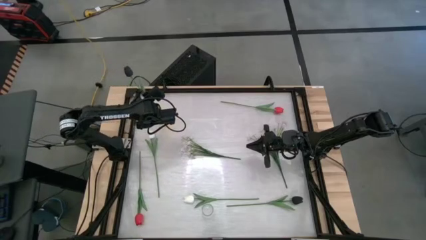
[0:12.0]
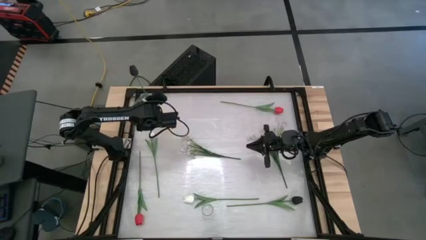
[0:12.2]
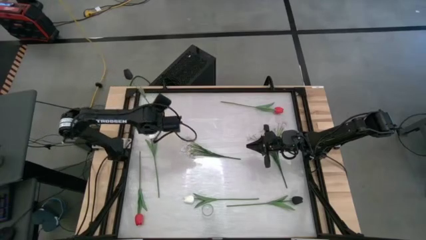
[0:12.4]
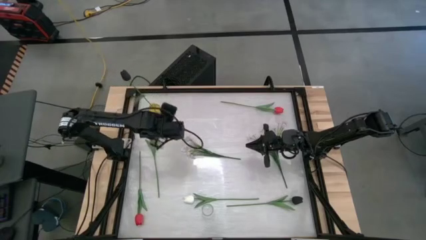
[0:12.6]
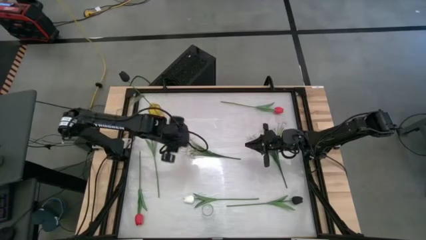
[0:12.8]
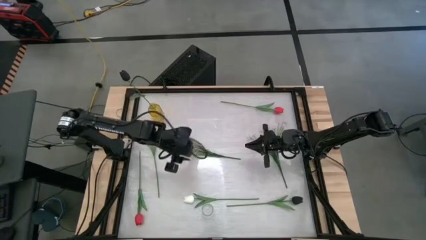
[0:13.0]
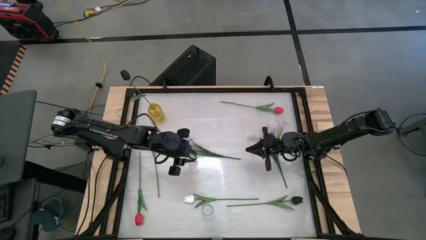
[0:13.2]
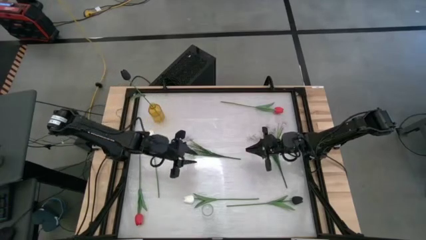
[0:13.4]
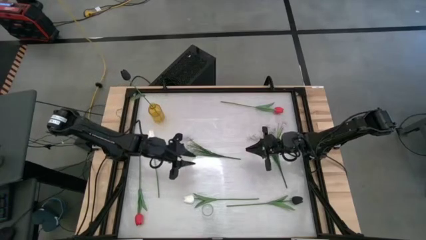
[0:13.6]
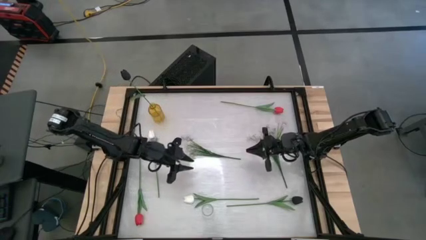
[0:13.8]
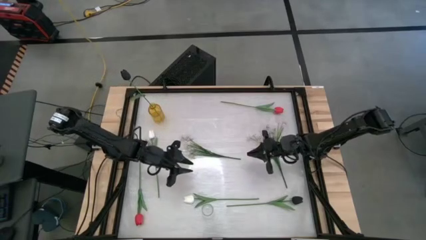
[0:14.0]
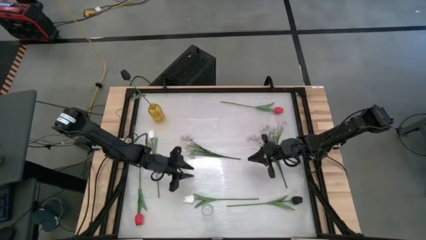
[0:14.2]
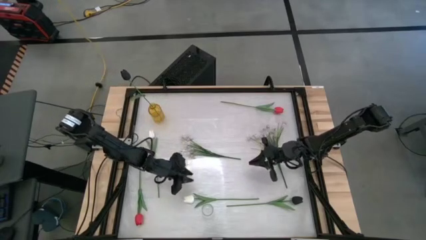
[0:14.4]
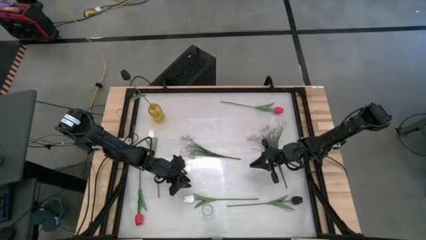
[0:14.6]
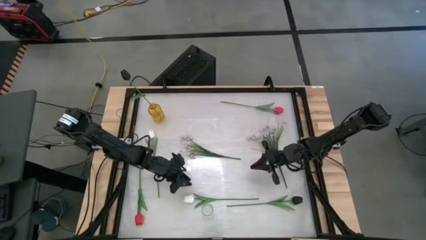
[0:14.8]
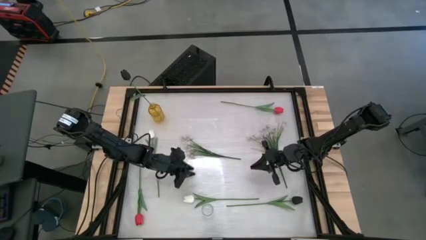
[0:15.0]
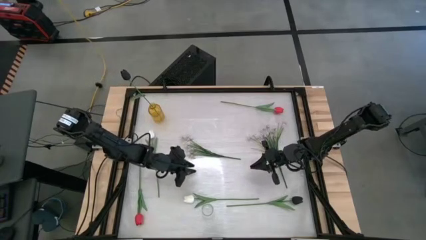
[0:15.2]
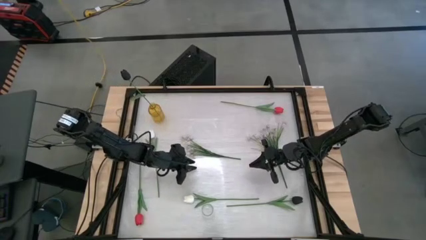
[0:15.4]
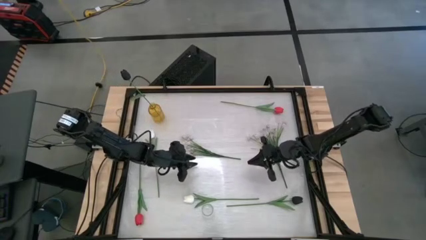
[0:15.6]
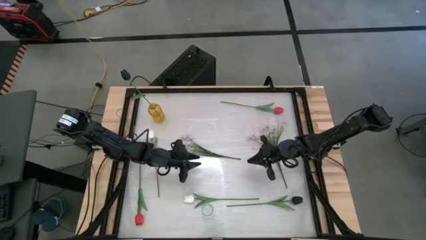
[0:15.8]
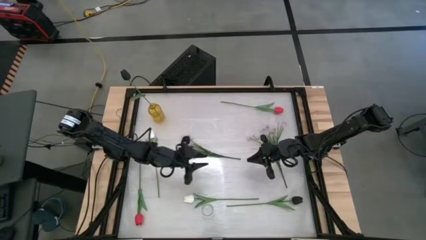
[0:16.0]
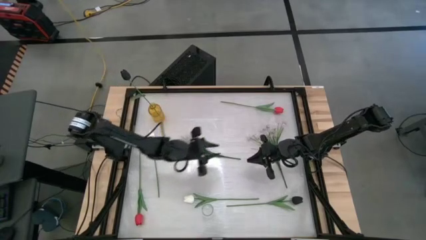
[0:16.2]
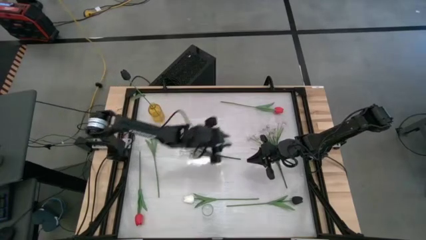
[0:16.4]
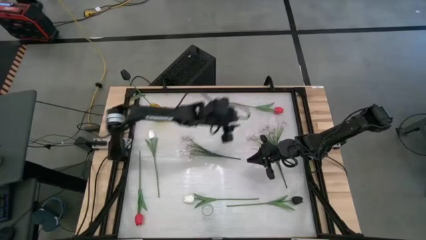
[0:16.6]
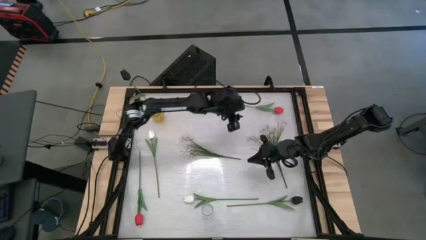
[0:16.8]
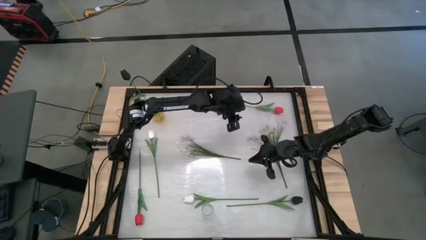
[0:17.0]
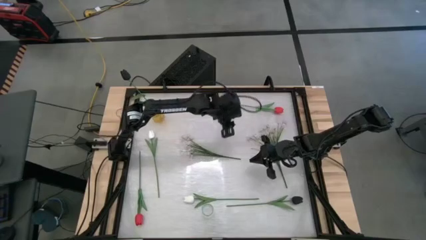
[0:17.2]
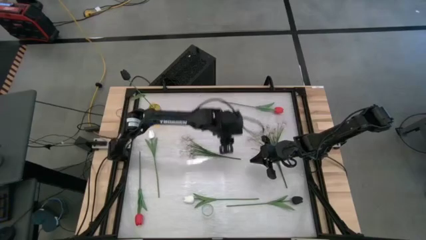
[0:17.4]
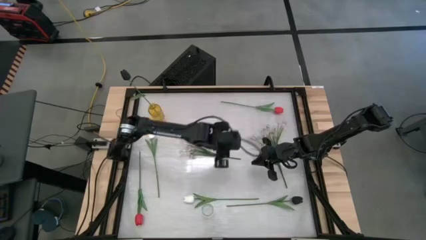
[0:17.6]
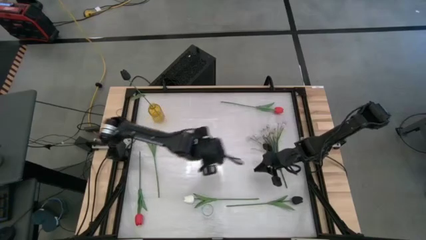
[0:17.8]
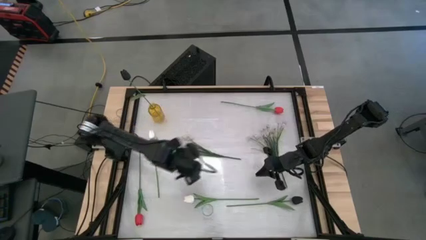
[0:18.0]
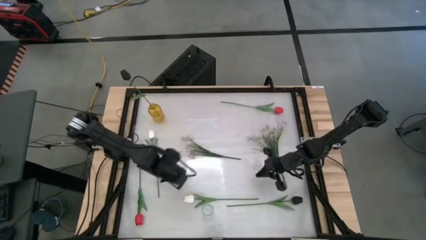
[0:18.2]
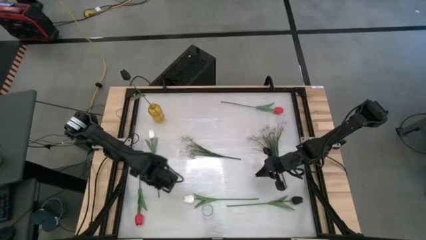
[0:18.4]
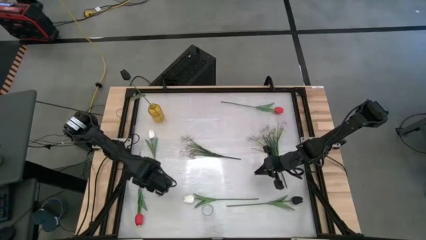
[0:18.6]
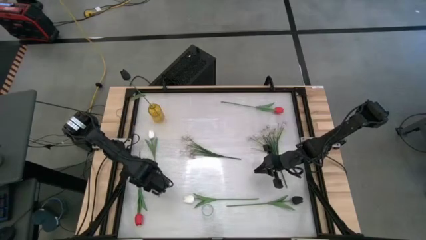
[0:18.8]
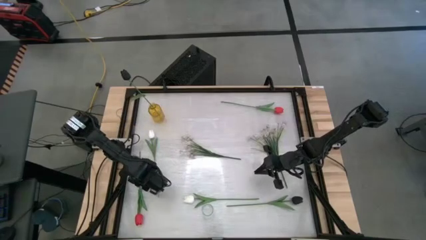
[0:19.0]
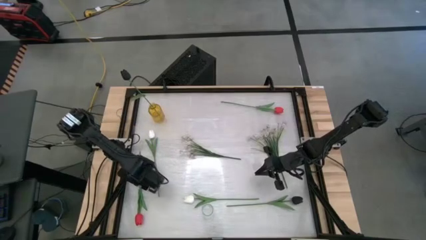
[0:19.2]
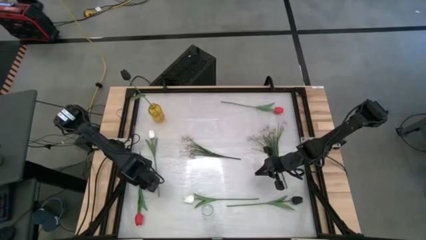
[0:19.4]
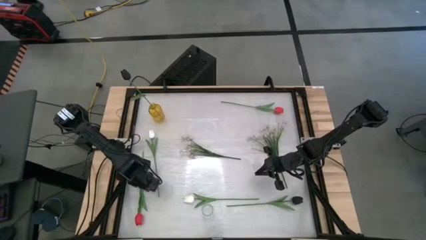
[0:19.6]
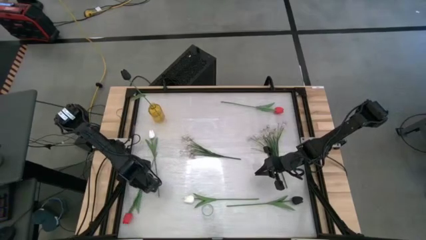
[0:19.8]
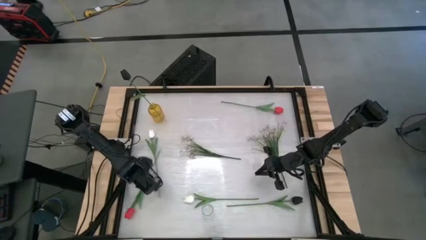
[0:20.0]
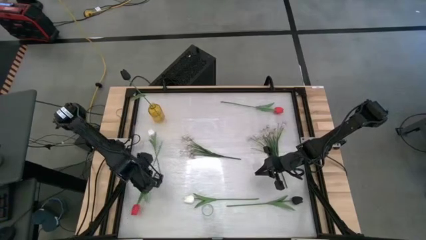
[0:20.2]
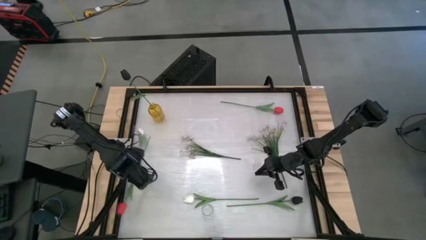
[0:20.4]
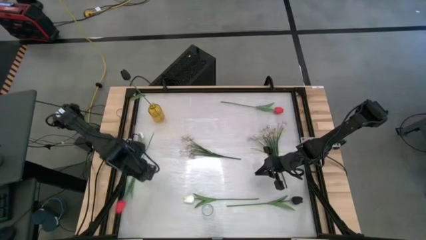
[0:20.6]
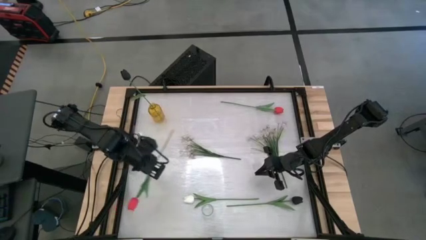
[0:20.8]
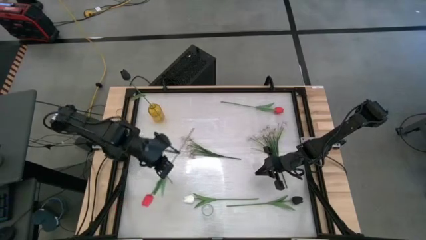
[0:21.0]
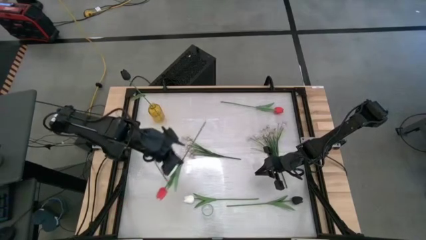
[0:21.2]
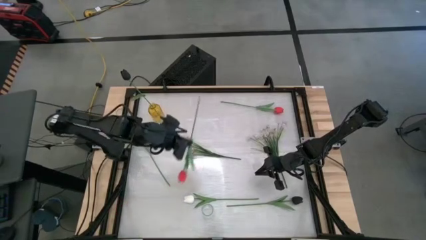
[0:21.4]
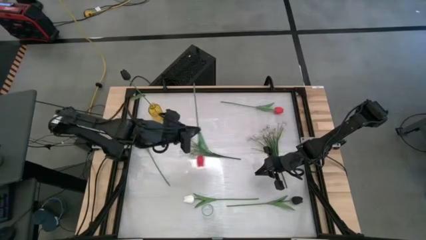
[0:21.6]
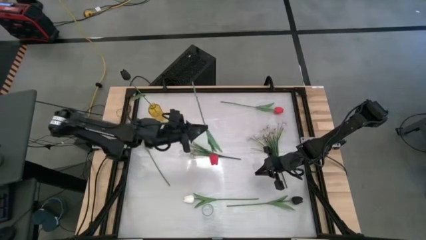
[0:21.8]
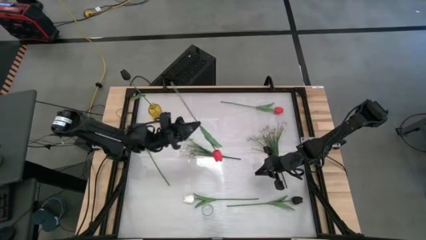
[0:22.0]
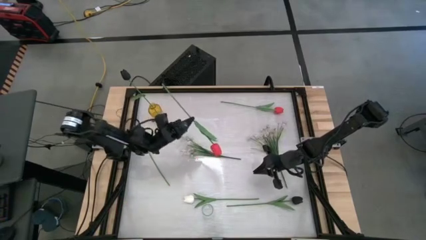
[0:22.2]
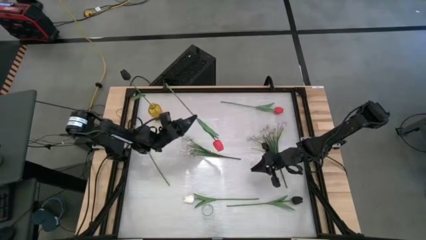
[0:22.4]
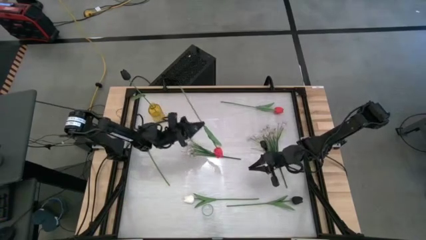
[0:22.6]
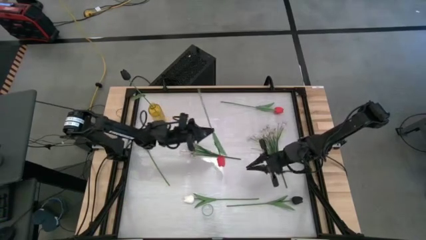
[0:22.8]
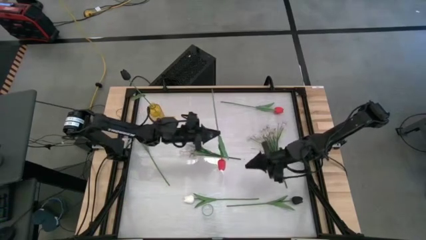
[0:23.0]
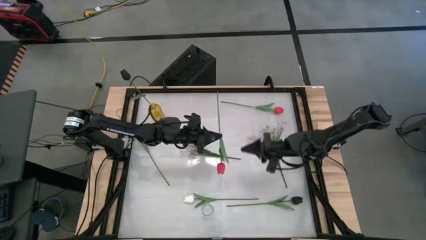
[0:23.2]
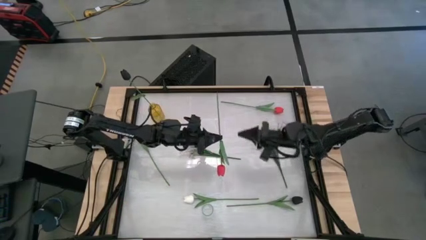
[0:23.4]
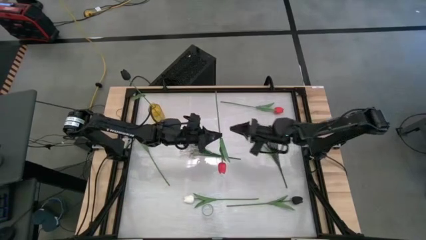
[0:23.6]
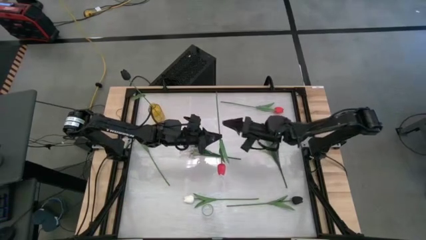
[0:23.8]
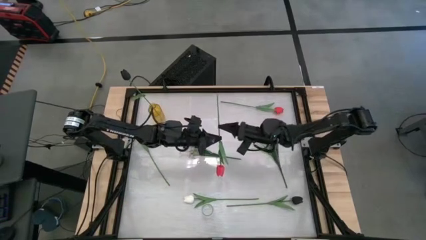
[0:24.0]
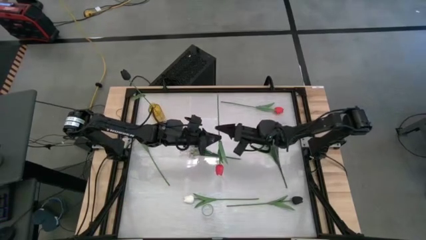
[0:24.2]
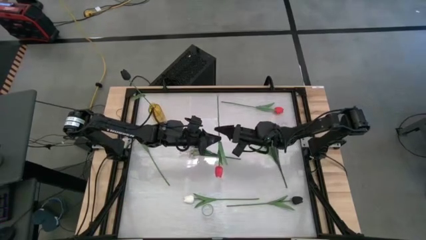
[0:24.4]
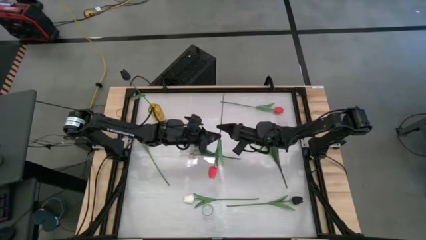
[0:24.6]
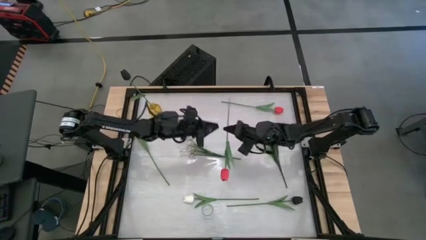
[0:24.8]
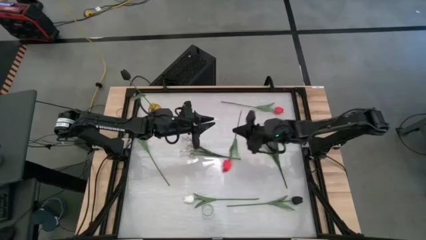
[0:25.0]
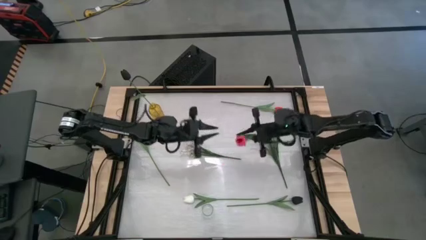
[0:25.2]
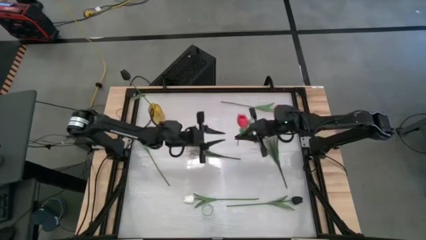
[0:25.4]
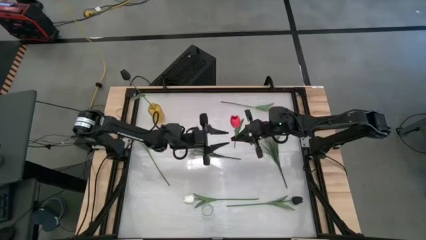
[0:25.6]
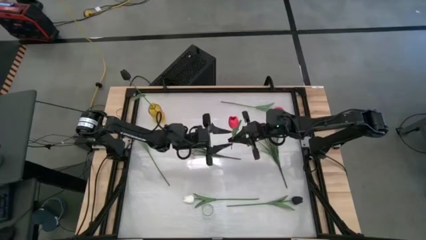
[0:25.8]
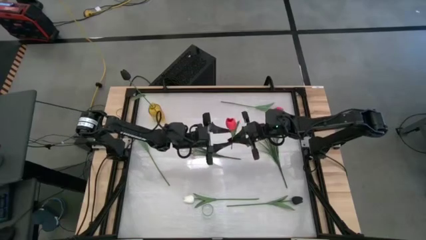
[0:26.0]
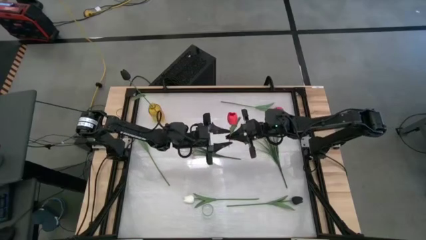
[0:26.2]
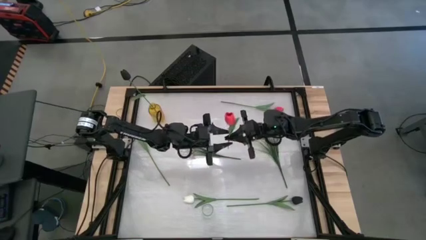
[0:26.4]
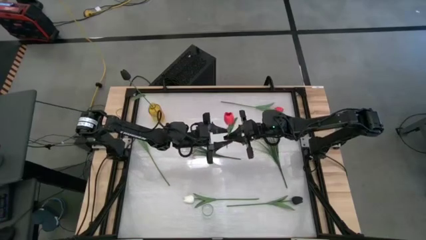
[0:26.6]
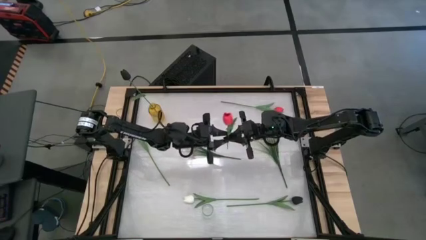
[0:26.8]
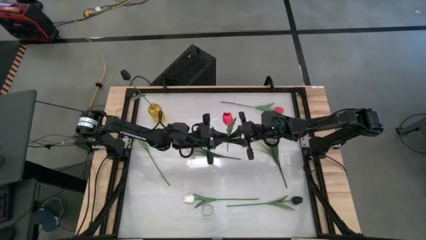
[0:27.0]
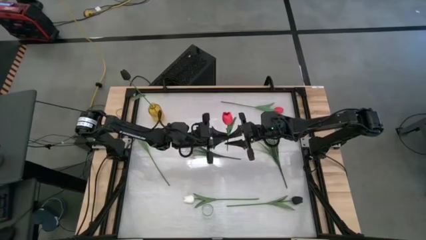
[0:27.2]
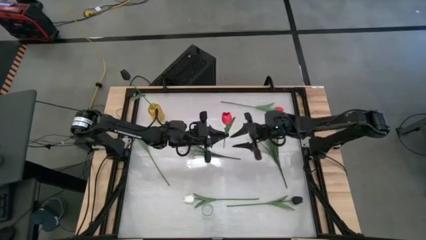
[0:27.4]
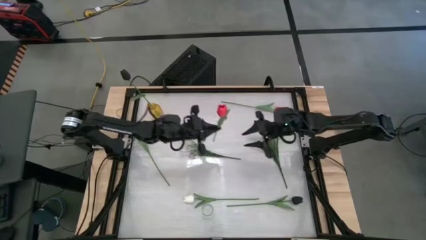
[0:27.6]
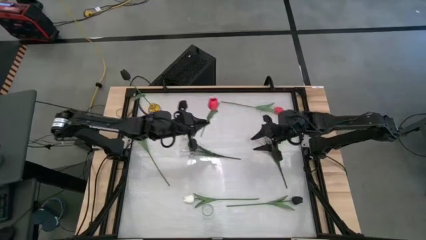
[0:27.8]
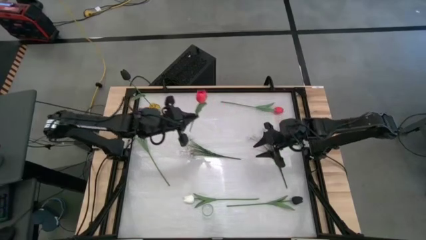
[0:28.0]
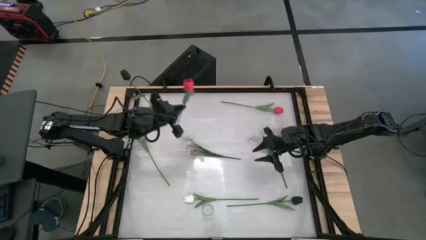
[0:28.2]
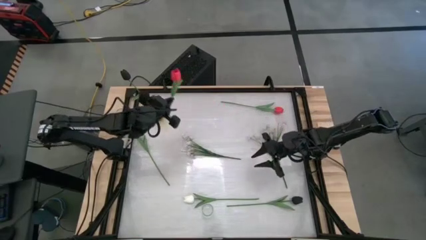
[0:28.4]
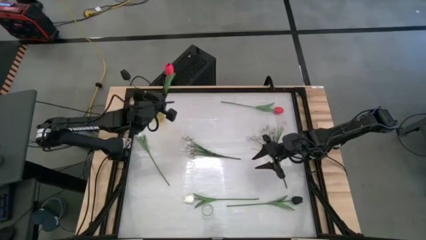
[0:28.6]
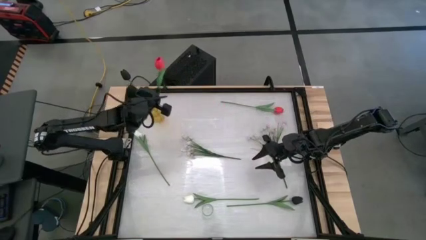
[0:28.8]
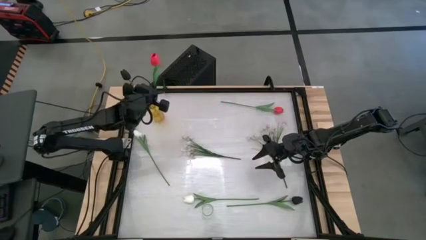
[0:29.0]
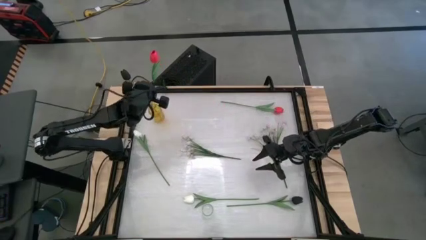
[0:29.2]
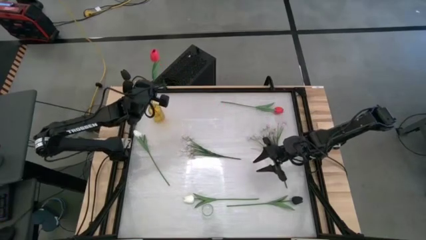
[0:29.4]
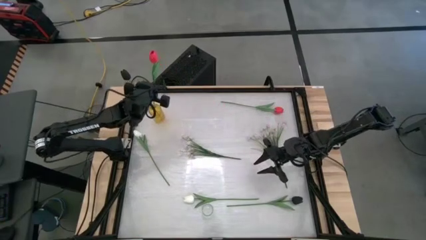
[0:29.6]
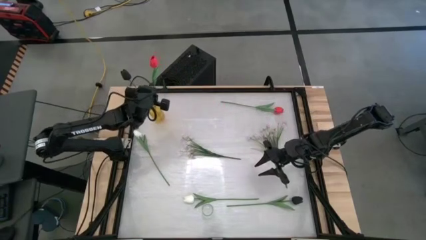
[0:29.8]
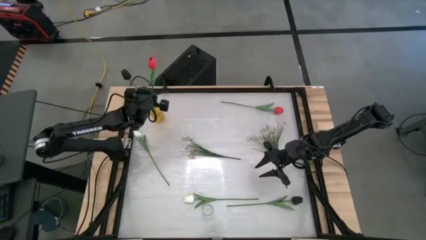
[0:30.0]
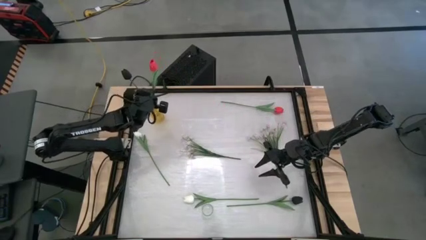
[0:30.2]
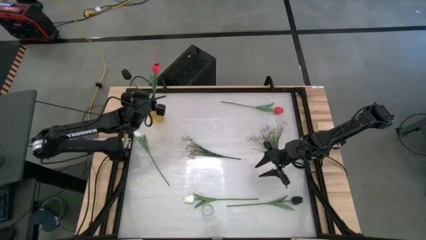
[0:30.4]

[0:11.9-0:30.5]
Task: Sort flowers into vase by color
Put the bottom red tulip into the yellow vase
